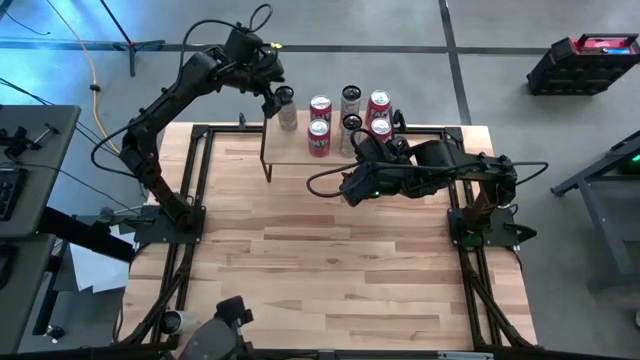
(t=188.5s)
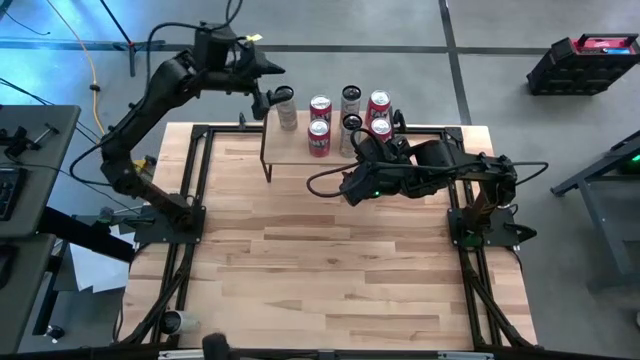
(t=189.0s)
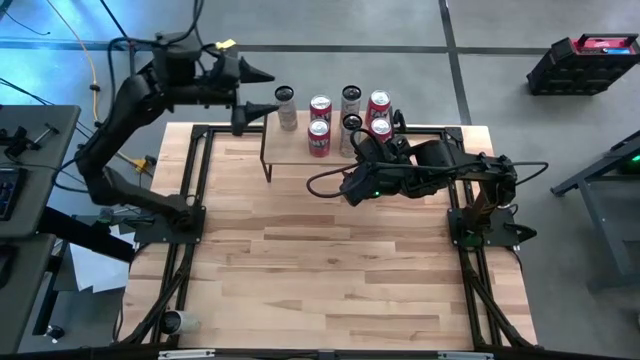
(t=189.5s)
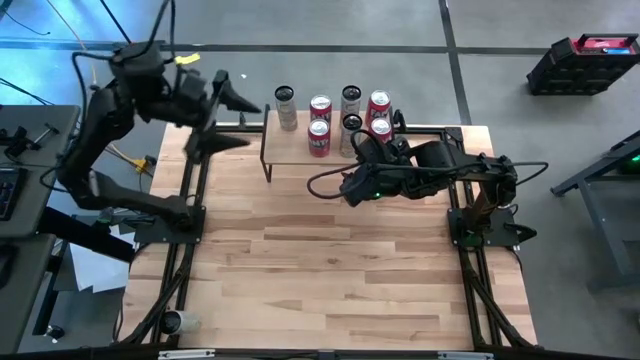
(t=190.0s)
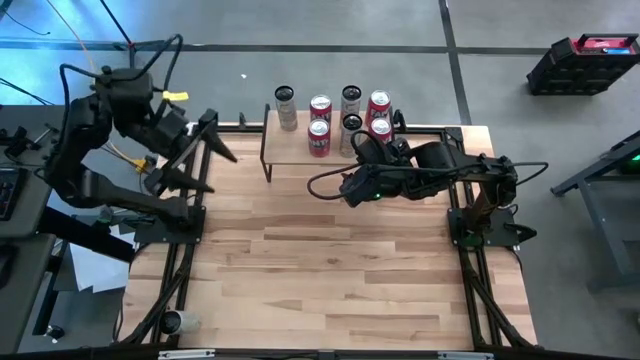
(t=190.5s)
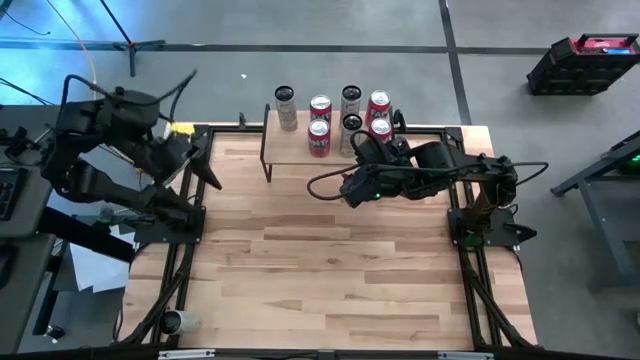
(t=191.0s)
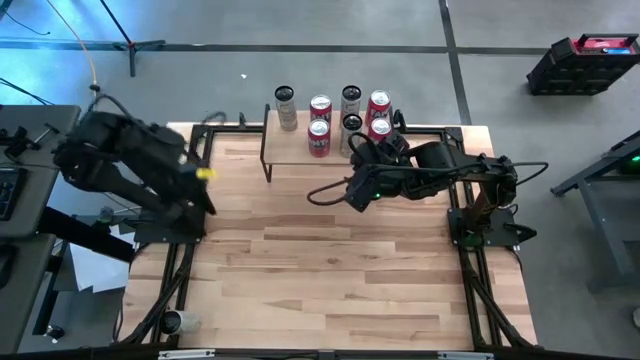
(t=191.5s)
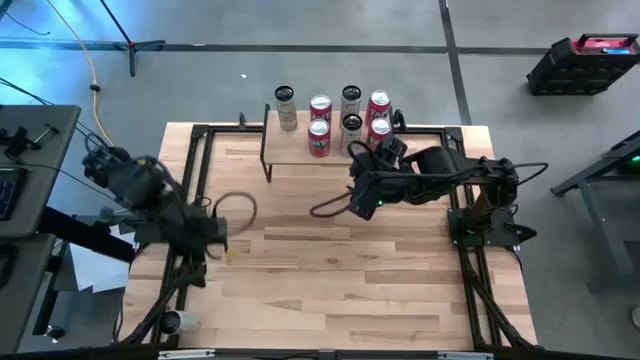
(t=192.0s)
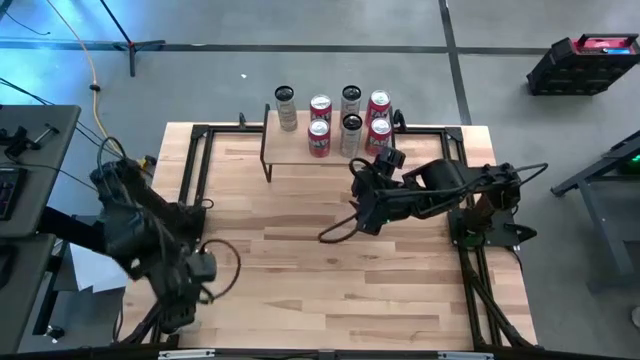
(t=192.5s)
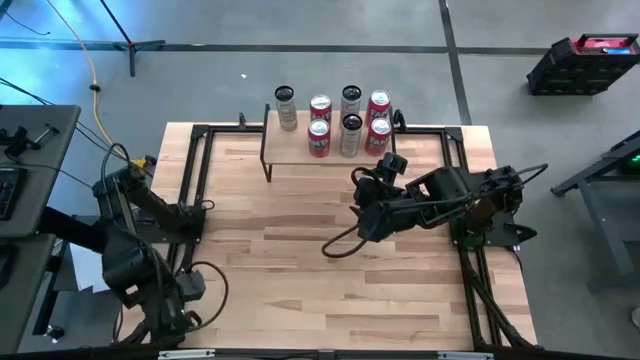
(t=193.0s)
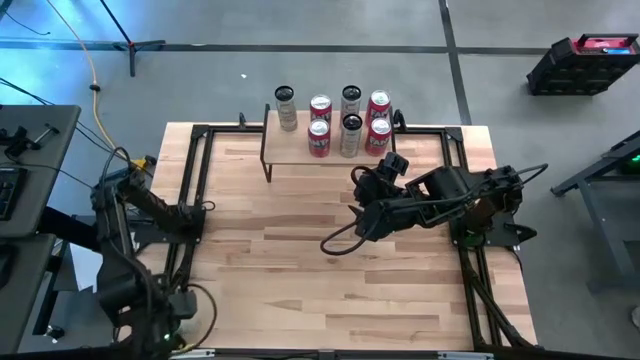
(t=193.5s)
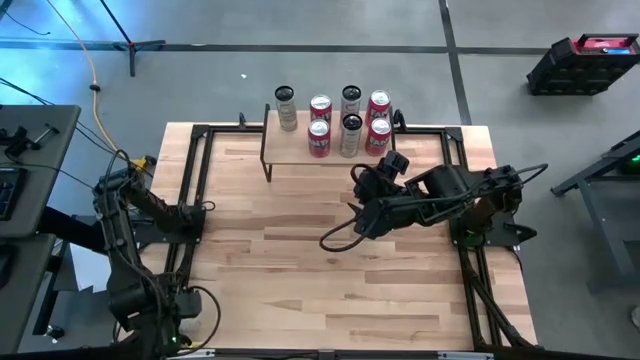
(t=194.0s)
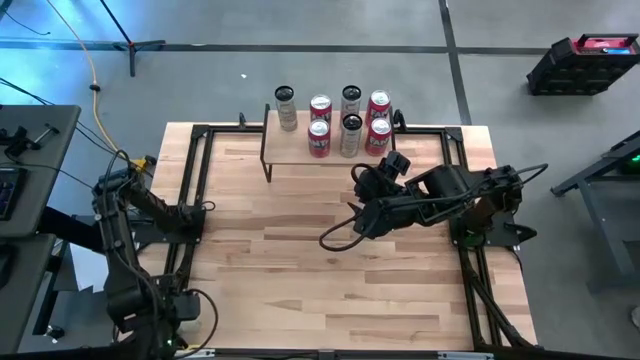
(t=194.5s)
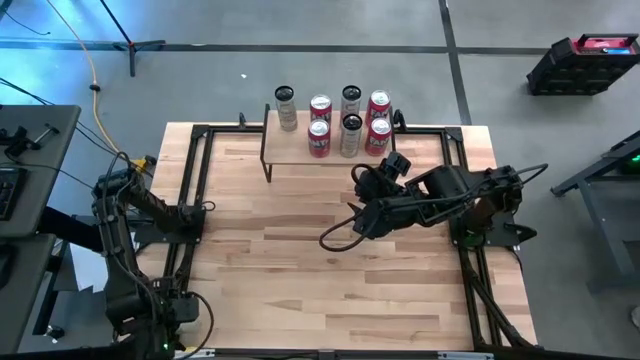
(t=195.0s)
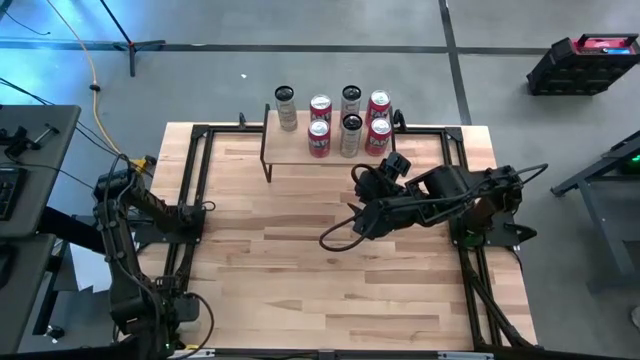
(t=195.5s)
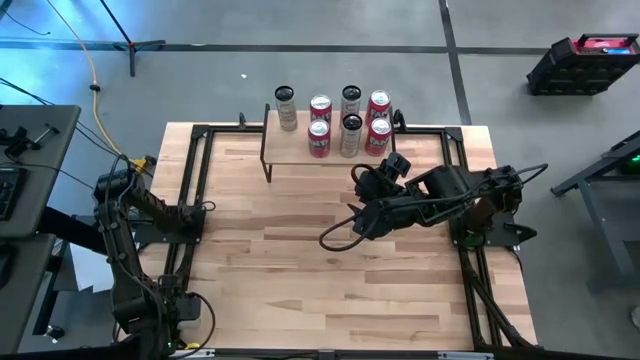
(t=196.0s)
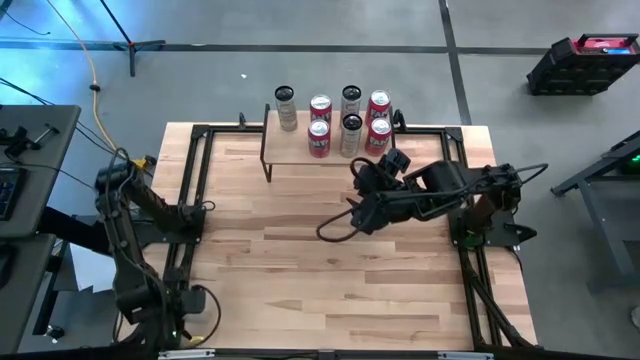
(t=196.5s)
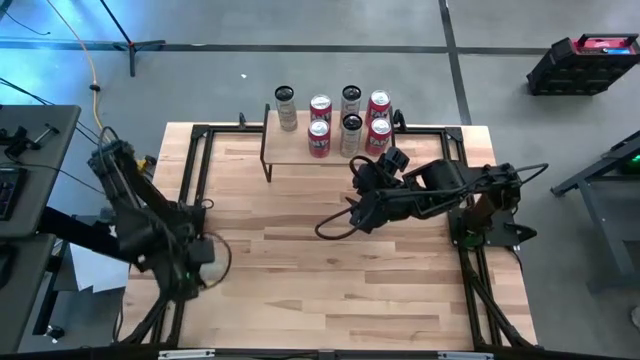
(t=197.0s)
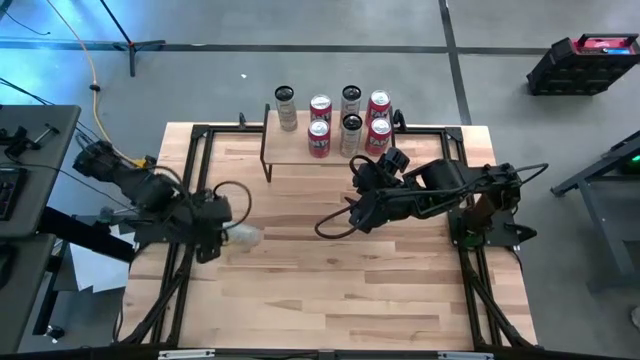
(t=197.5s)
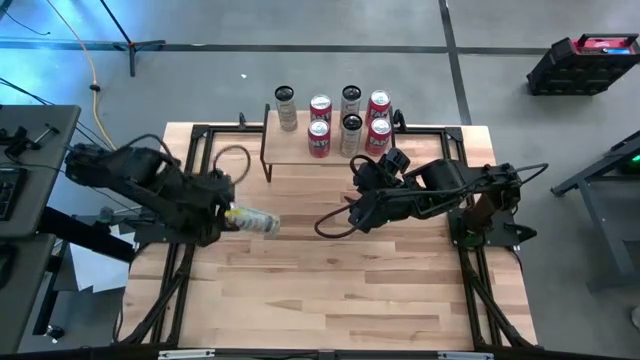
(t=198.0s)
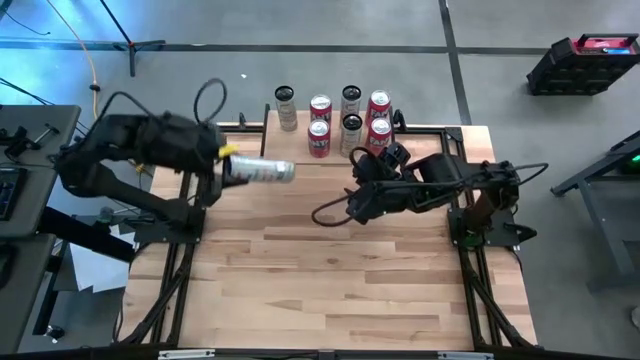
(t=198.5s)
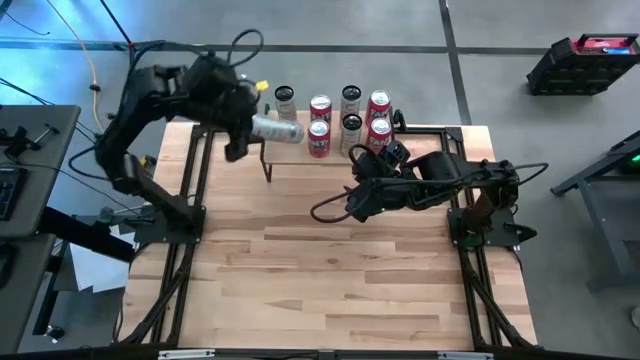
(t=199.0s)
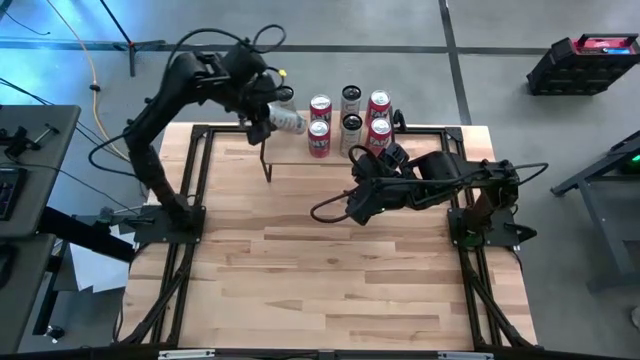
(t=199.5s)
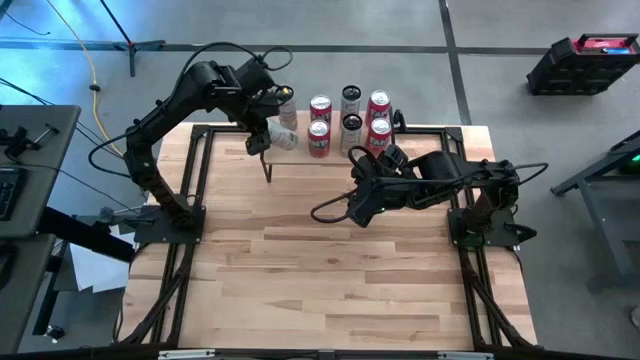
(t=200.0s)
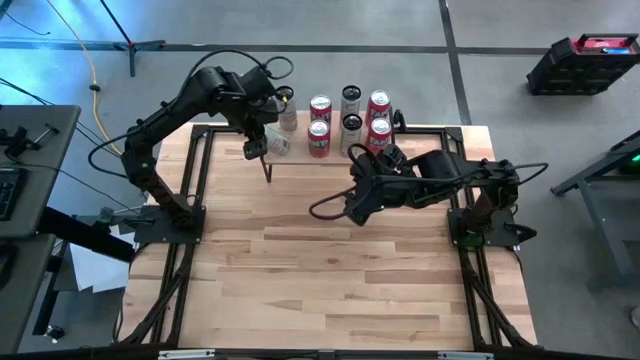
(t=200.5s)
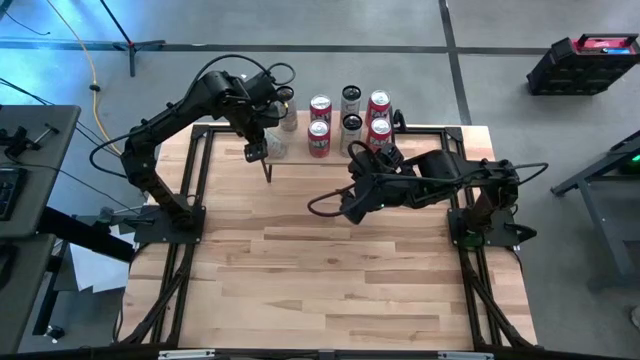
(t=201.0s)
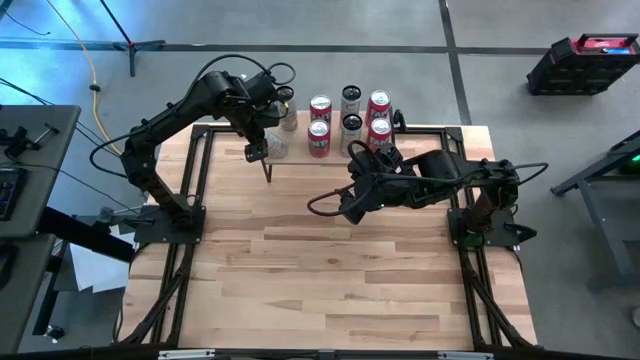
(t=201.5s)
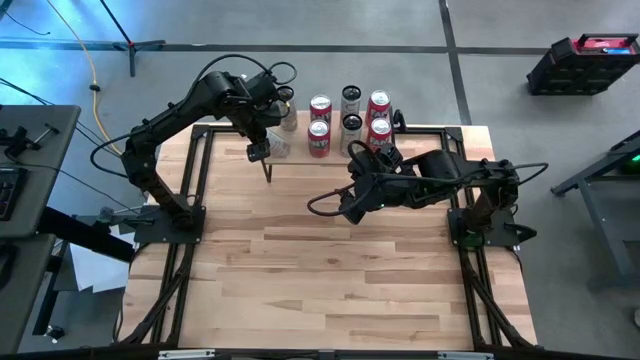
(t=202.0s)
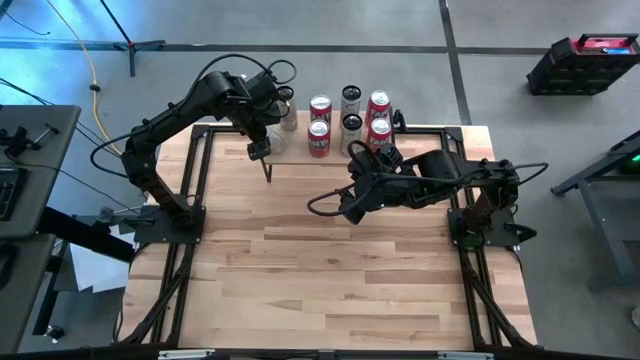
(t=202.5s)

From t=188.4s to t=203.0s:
Task: Place canned beverage on shelf
Put the white soda can aligned with the other white soda can on the shelf

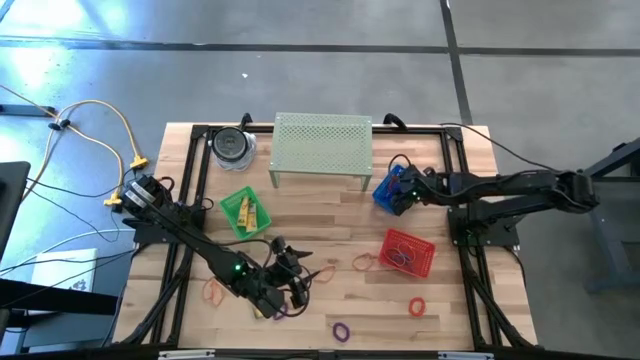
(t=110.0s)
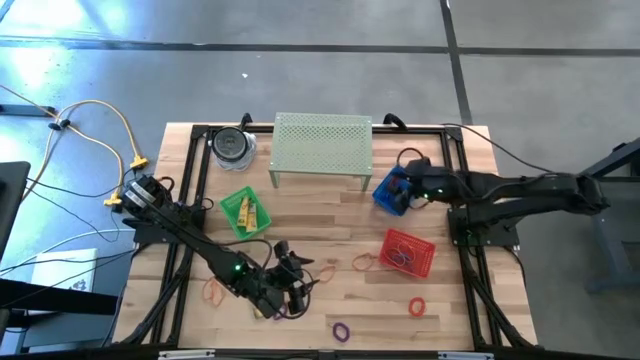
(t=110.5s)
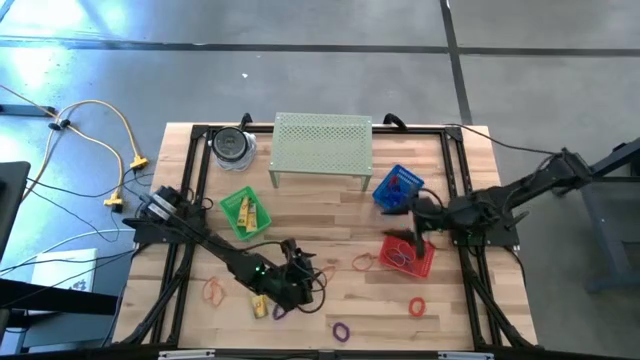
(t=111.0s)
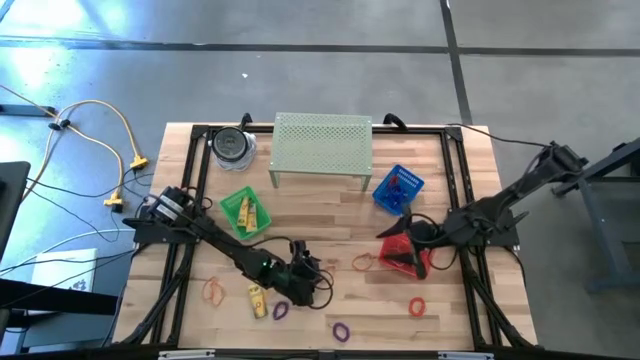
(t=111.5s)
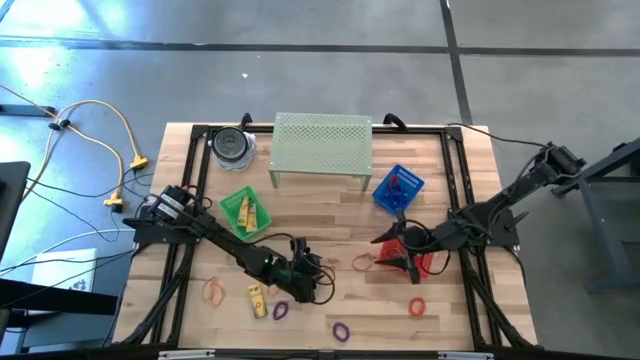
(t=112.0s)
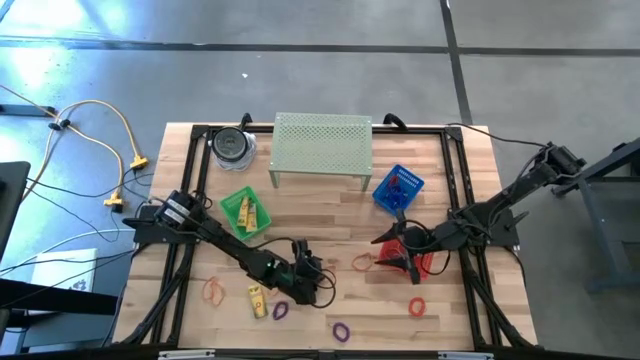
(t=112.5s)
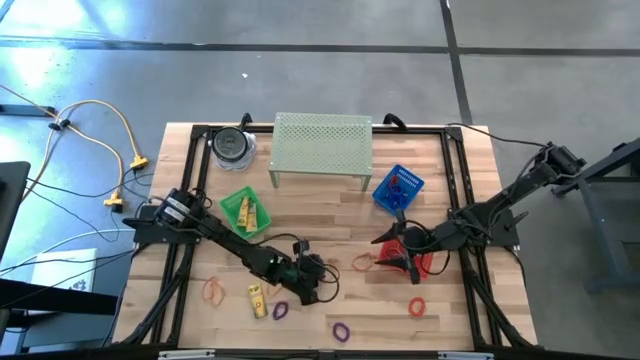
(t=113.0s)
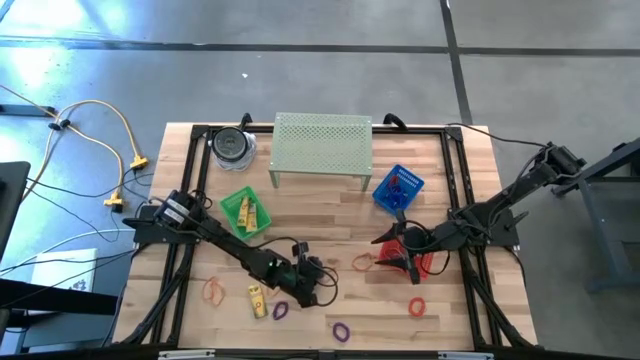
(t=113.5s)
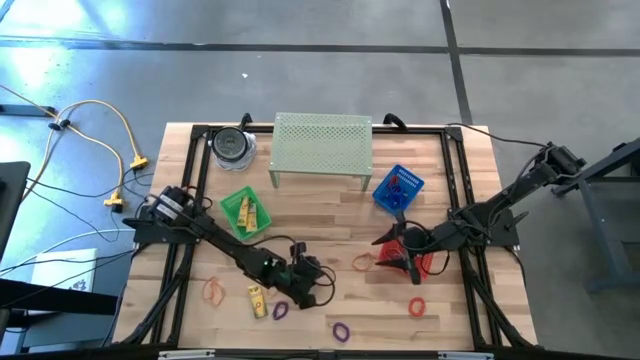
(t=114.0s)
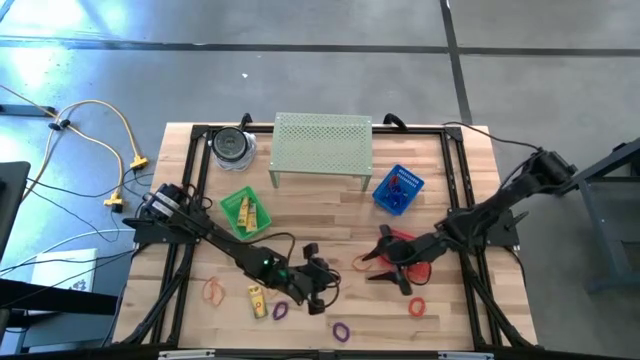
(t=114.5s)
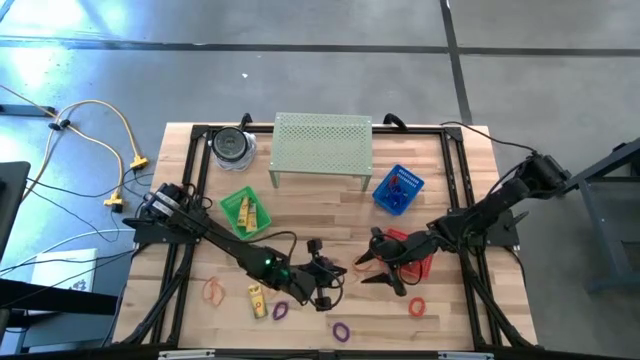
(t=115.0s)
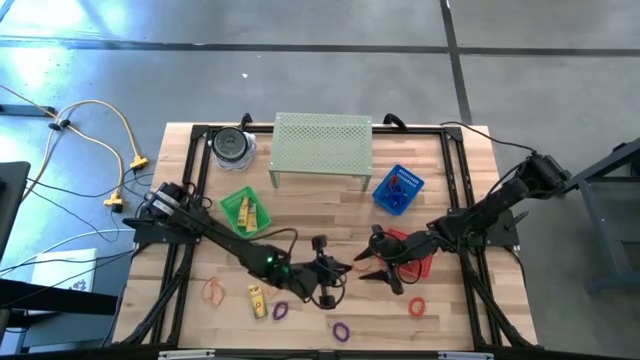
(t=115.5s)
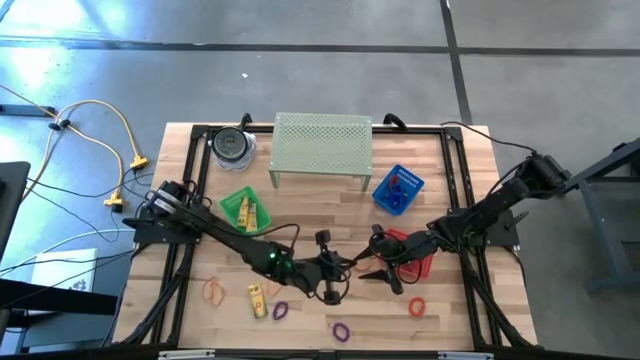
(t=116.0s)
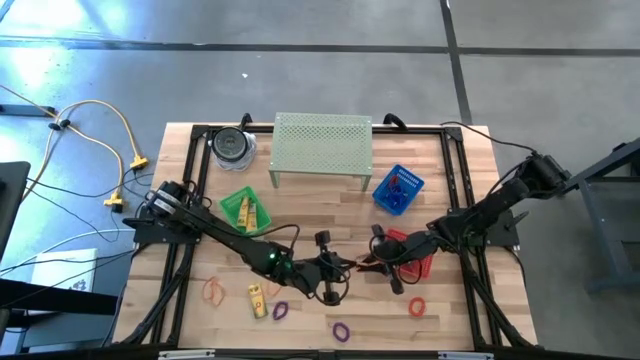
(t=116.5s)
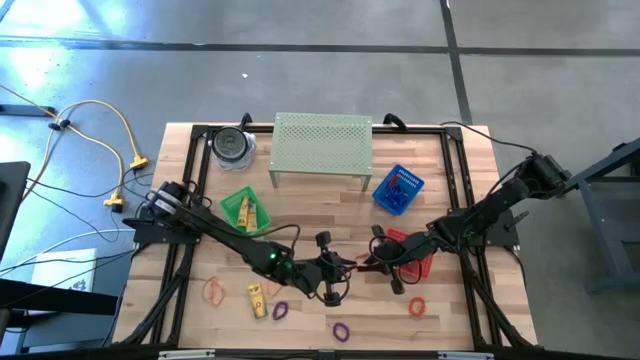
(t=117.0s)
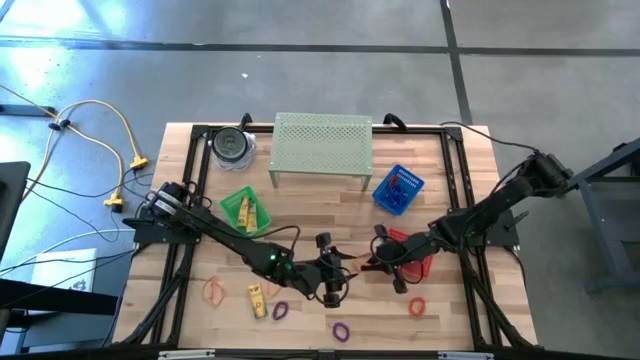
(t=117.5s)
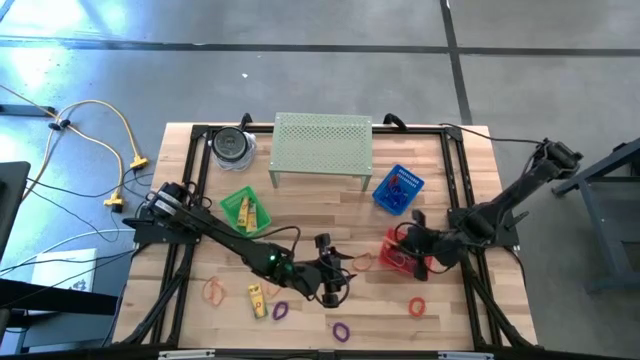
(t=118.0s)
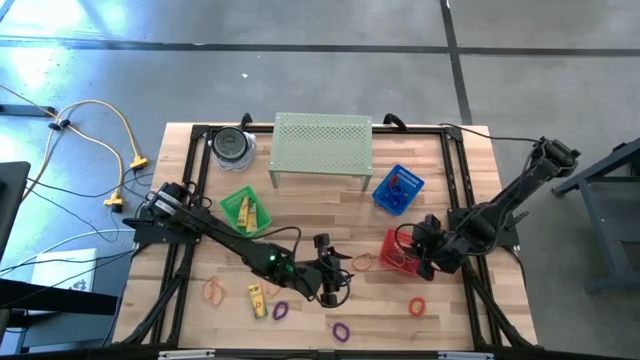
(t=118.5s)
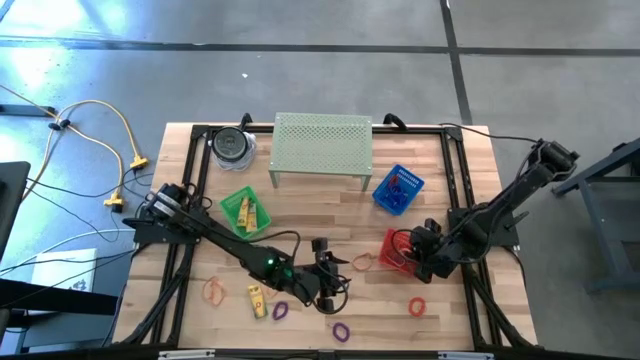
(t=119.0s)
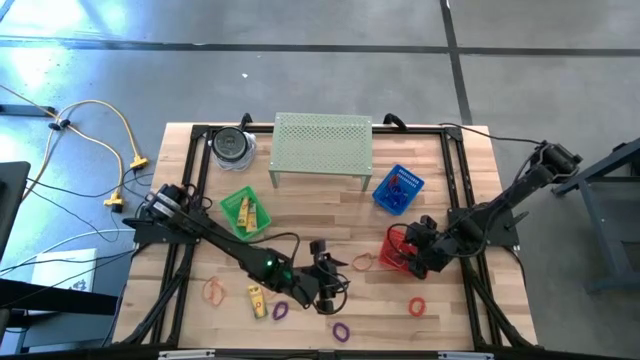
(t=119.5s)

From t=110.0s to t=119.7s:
Task: Pick & Place Office Desk Supplies
Put the orange rubberband into the red basket
